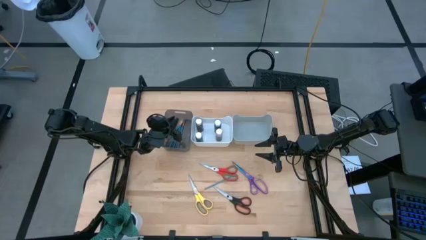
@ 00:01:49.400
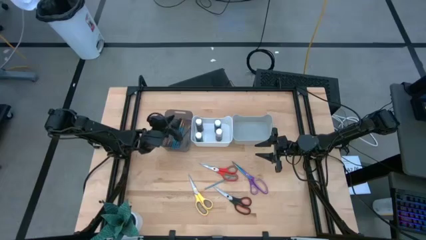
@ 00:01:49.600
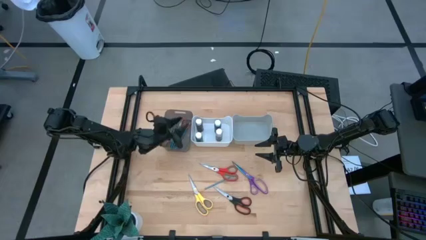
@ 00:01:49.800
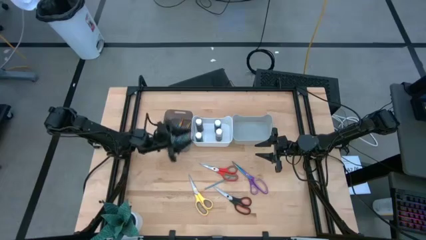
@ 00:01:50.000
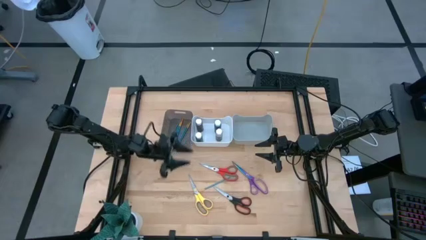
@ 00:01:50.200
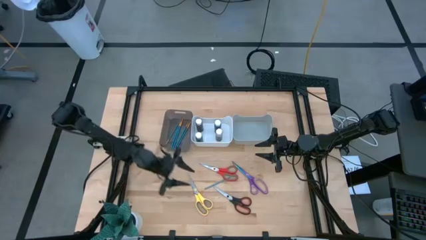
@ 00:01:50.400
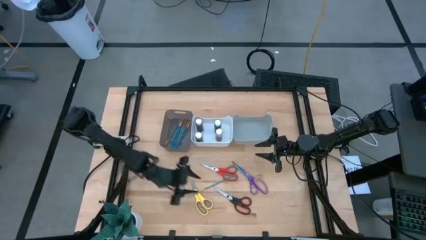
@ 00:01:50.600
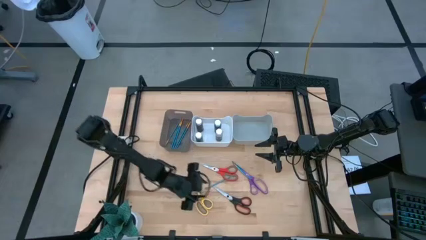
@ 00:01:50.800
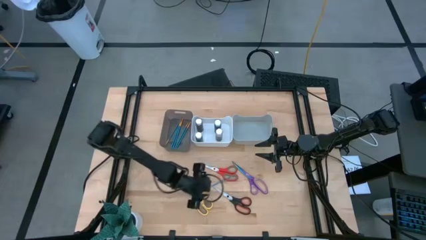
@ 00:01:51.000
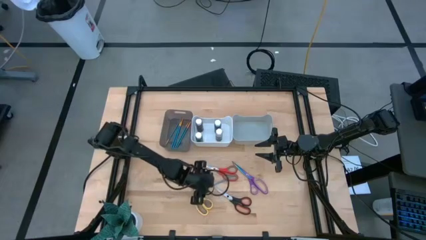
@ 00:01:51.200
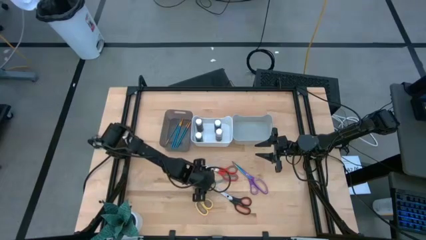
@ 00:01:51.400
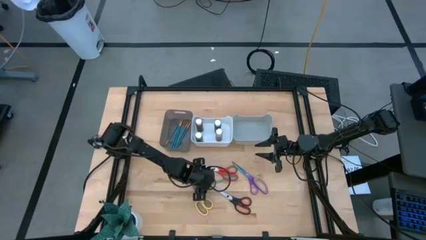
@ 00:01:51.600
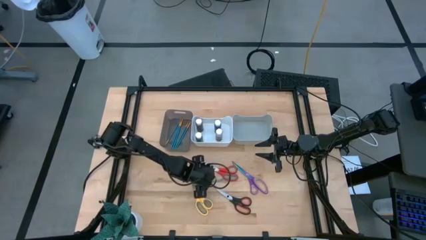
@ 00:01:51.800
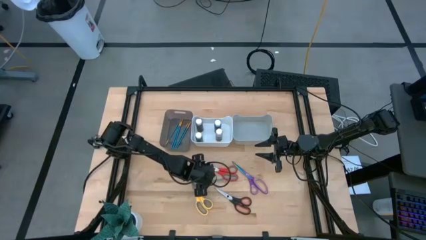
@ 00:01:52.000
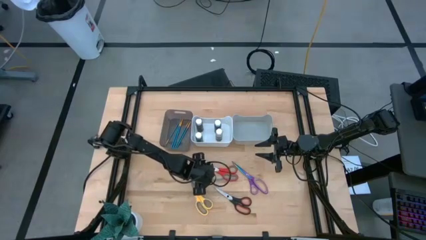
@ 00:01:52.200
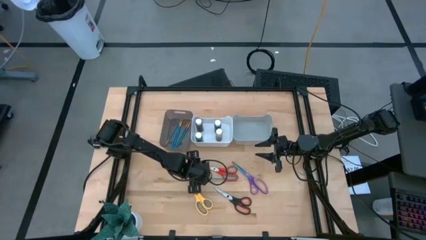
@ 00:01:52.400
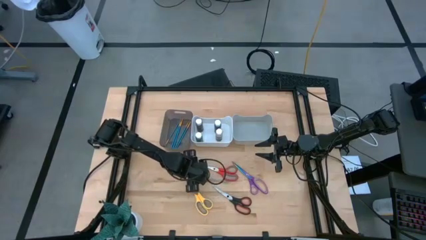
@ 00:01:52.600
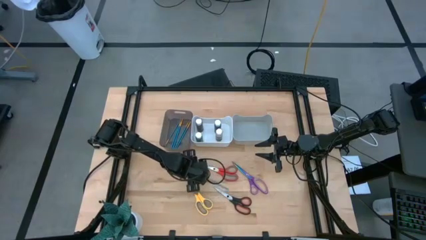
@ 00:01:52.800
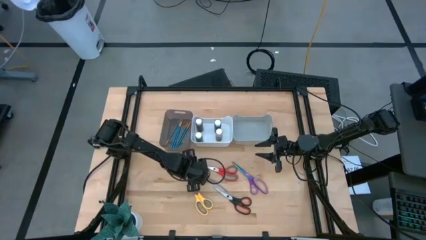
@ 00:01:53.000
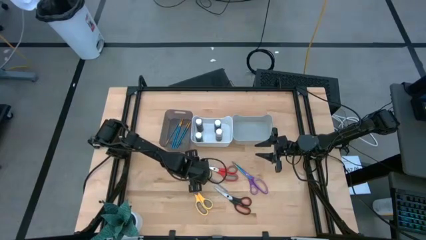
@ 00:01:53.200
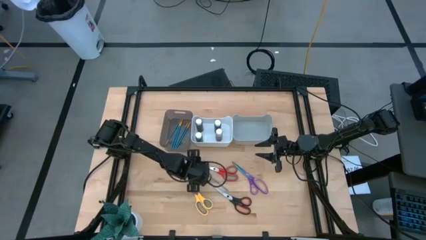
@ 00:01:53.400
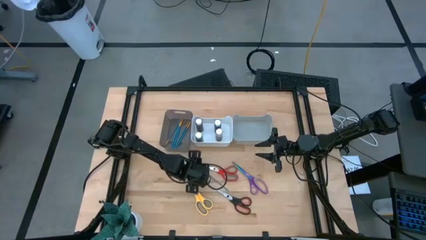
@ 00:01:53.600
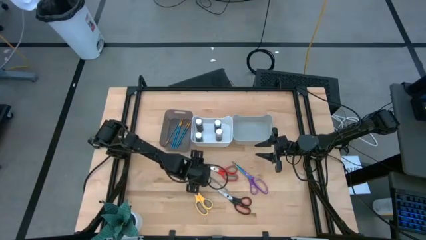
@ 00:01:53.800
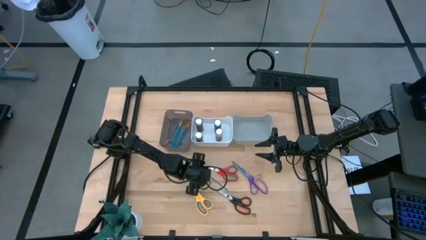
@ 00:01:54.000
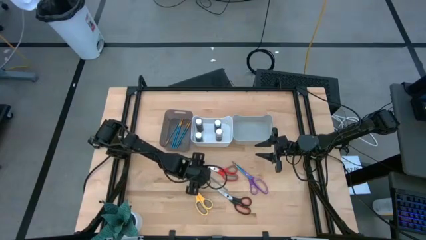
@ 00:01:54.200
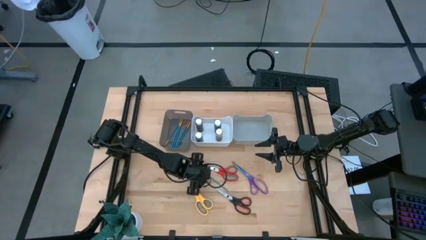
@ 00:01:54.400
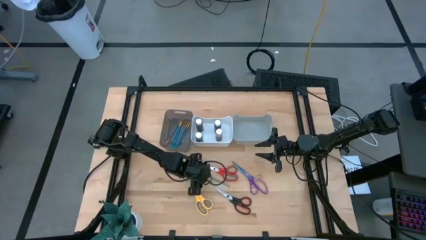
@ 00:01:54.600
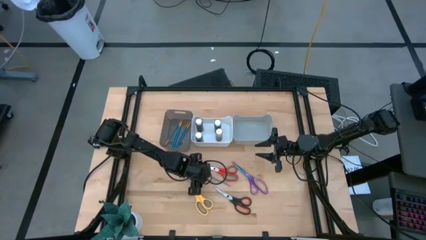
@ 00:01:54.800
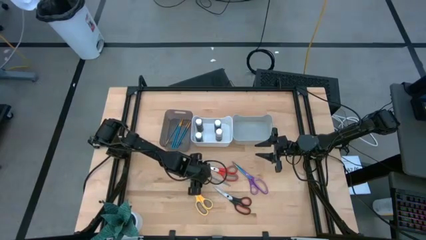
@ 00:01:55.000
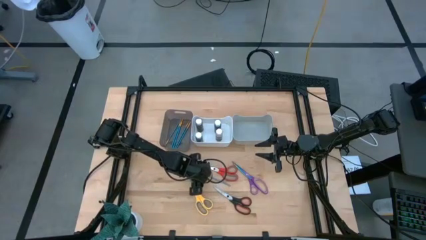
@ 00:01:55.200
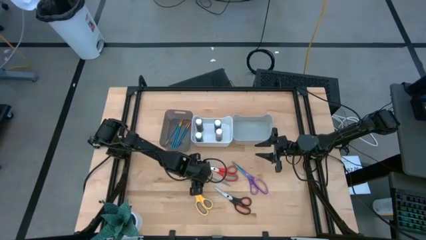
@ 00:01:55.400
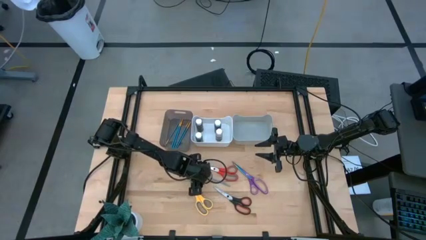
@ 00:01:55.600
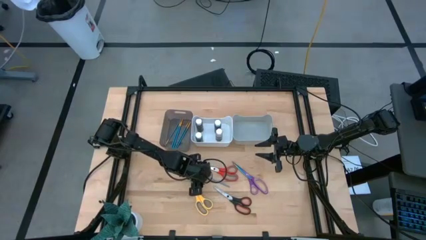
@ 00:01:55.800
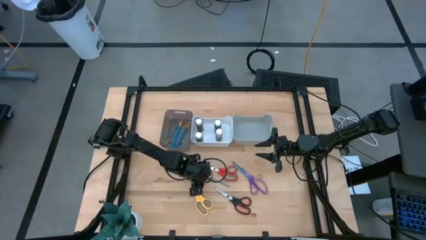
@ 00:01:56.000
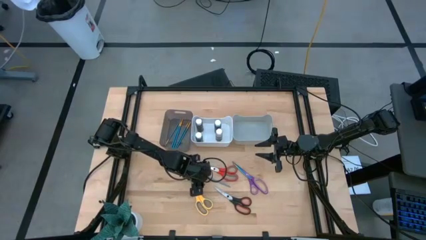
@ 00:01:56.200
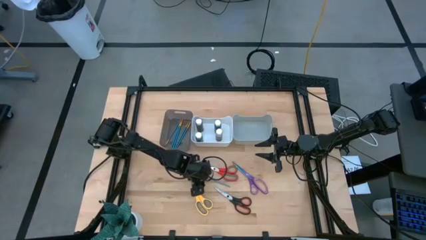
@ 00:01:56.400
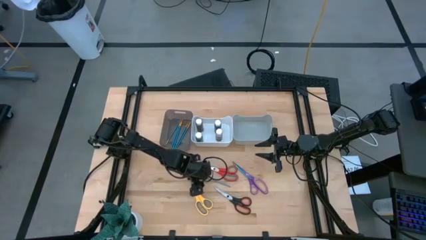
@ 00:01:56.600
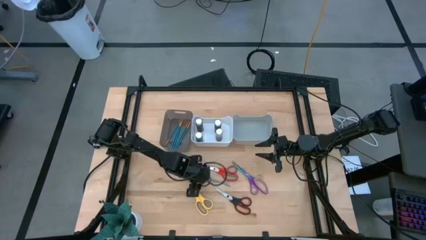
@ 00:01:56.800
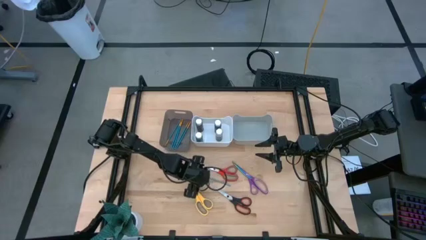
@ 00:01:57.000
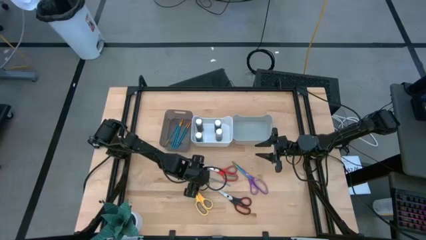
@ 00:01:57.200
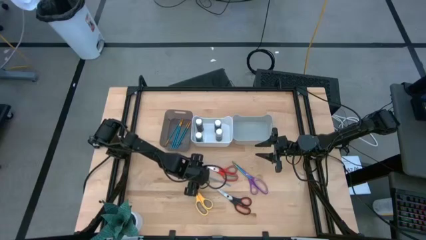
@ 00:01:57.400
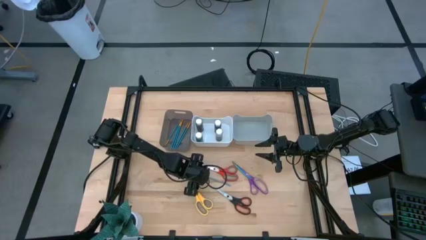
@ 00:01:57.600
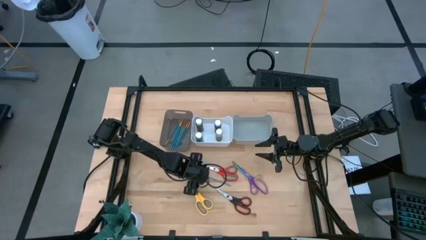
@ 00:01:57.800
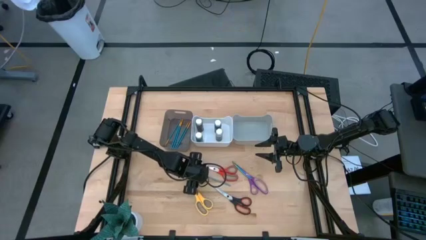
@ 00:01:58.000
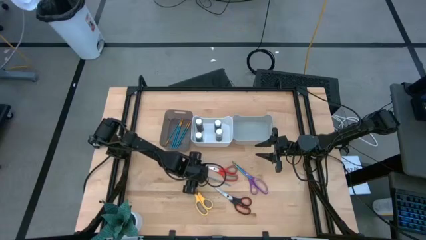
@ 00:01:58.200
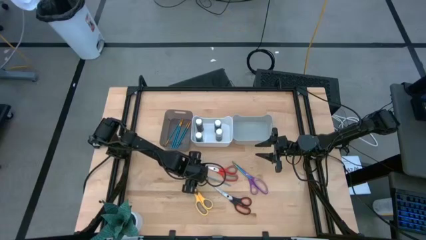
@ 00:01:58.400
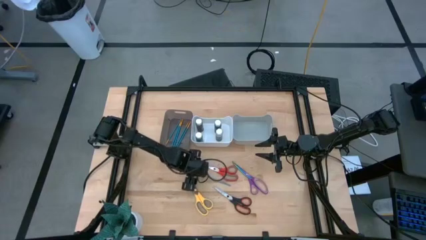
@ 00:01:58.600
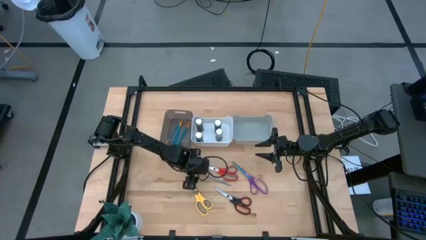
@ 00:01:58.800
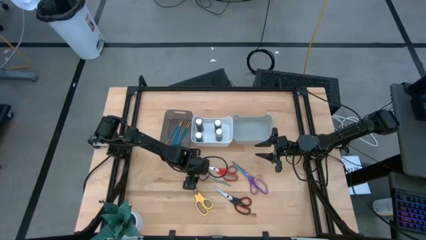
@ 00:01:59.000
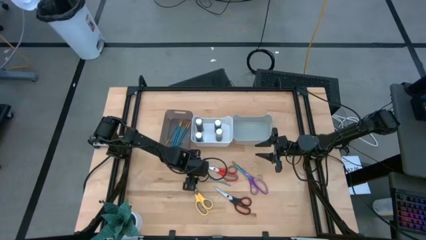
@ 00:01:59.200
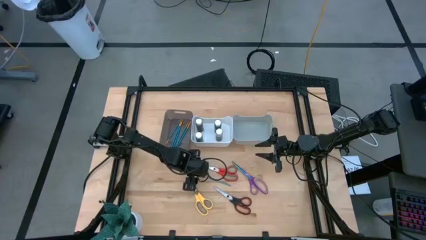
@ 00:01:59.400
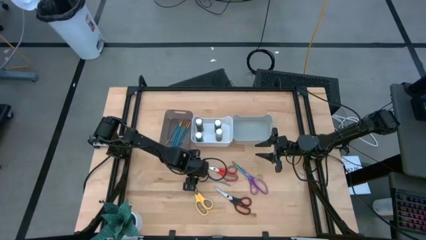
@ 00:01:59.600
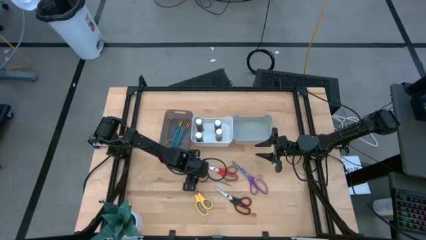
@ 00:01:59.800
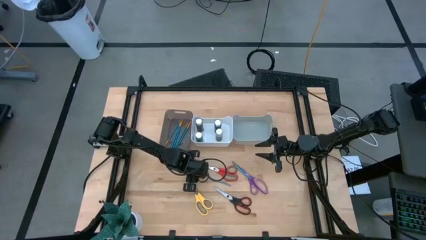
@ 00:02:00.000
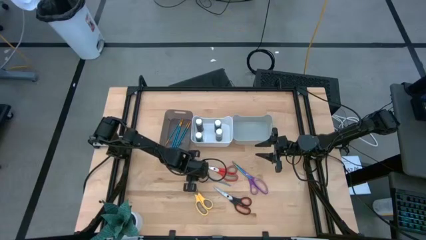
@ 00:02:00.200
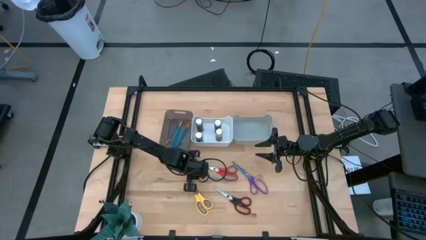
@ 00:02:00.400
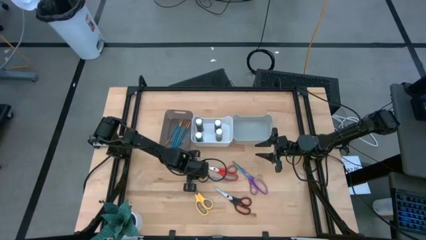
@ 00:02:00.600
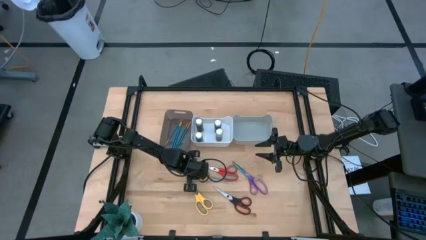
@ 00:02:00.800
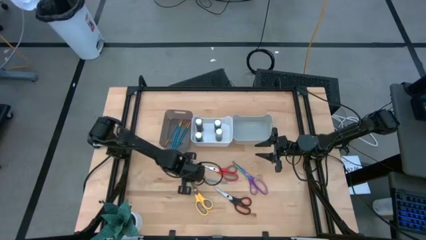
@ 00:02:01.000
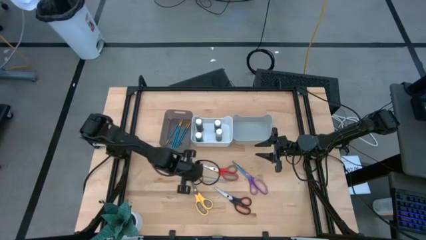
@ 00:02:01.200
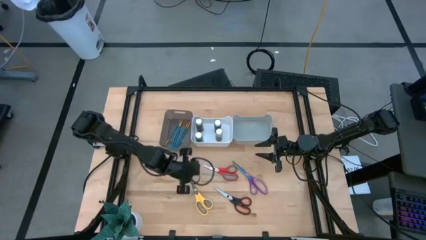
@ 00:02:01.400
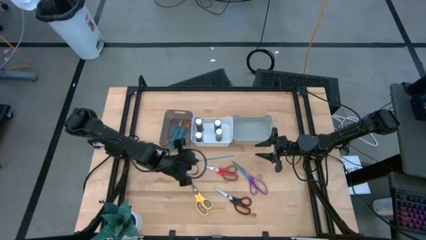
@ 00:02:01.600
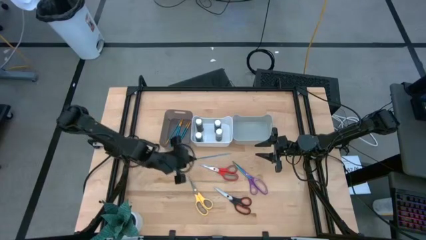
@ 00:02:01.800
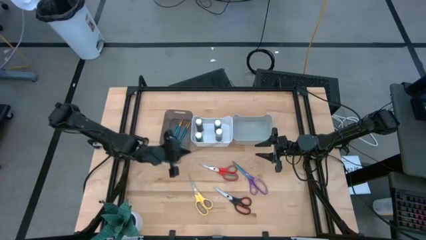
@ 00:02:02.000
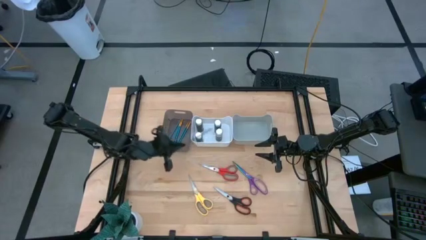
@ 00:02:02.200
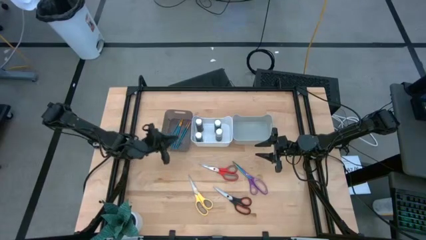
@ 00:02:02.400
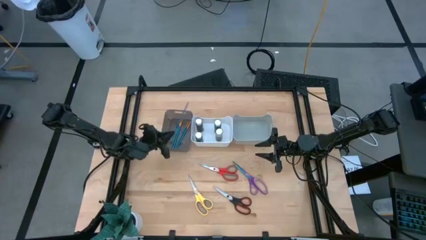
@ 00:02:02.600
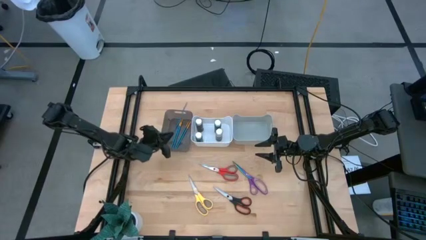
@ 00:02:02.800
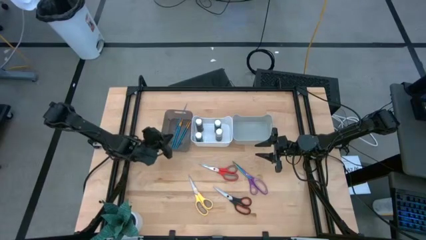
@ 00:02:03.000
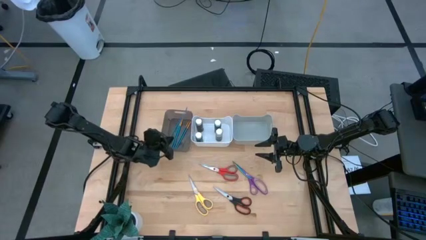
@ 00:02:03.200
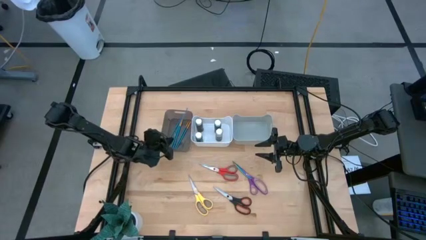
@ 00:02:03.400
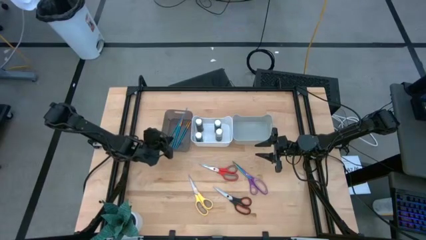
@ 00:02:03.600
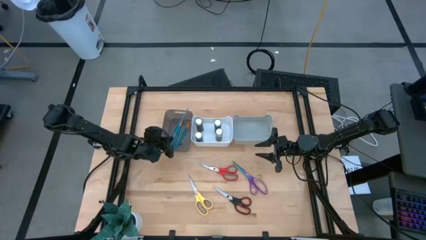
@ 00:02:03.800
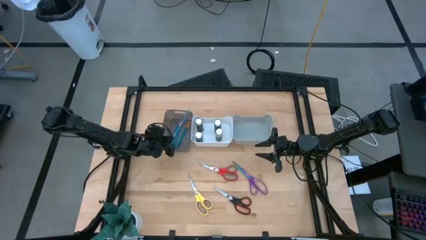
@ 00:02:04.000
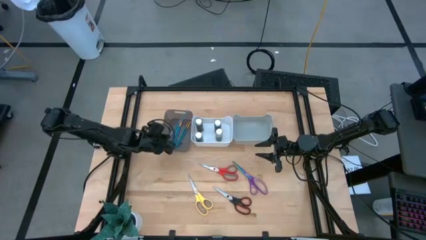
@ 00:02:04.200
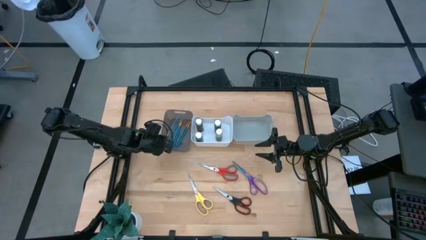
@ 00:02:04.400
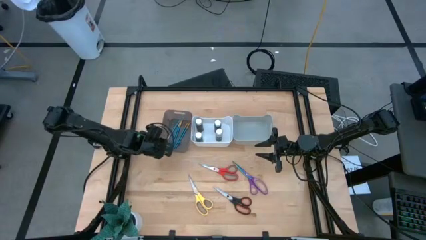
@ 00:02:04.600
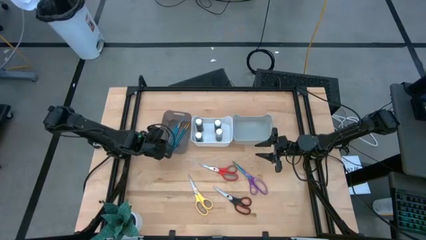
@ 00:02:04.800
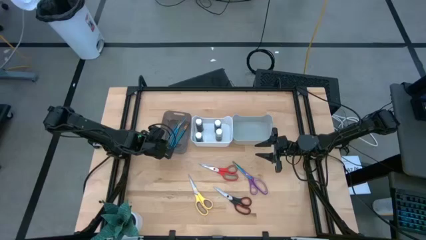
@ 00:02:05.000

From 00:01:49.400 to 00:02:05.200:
Task: Pick & Place Paint Supplies
Put the blue paint brush into the black bin

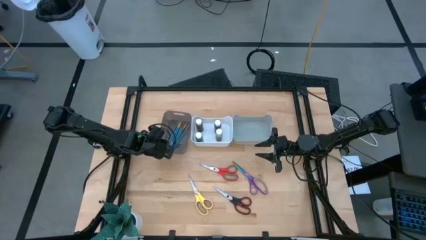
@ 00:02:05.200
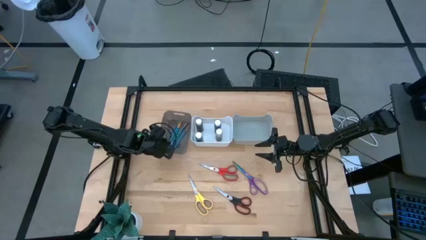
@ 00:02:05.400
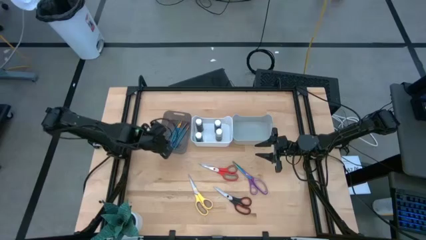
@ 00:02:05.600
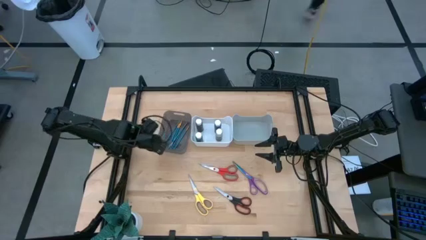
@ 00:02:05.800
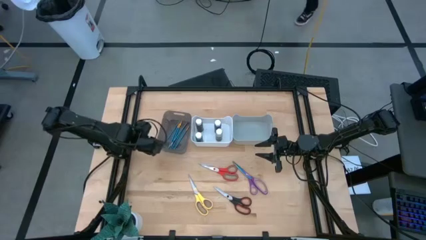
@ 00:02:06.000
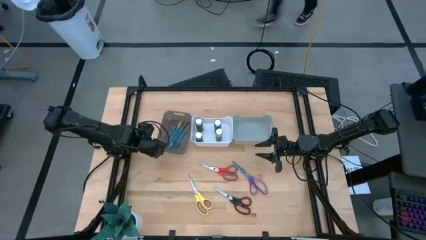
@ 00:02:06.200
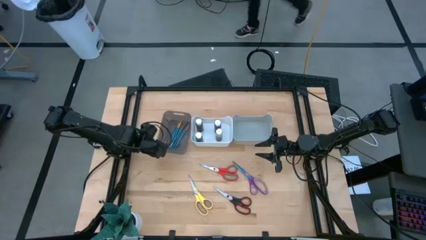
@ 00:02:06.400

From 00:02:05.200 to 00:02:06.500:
Adjust the gray bin
